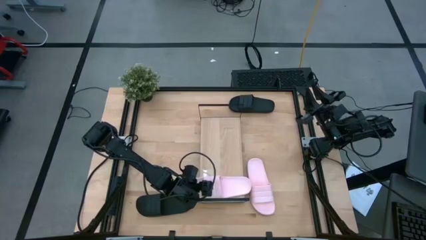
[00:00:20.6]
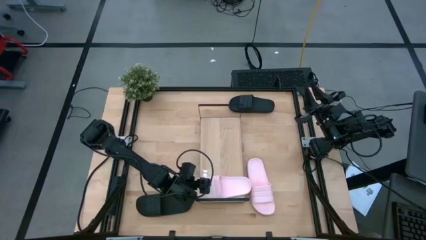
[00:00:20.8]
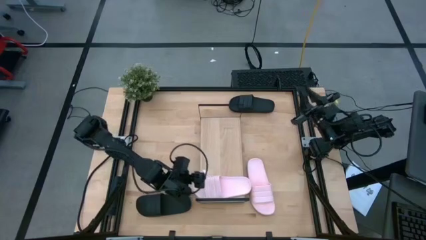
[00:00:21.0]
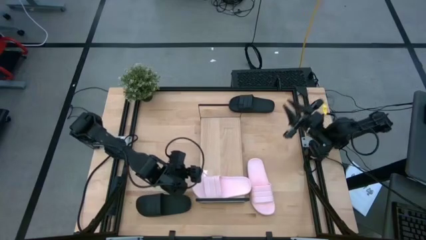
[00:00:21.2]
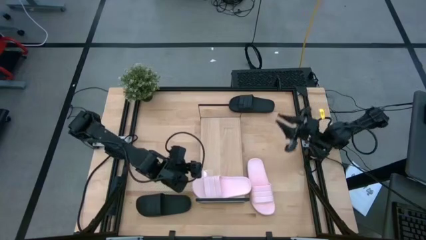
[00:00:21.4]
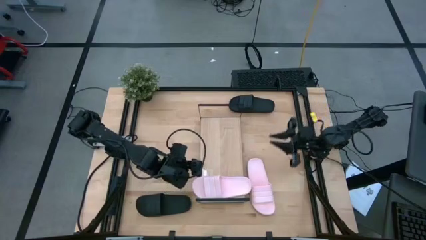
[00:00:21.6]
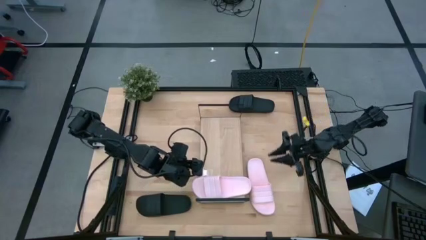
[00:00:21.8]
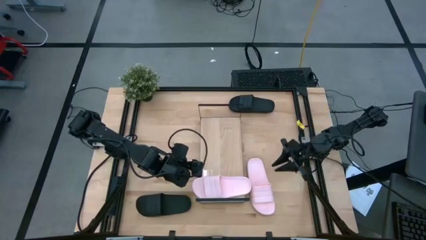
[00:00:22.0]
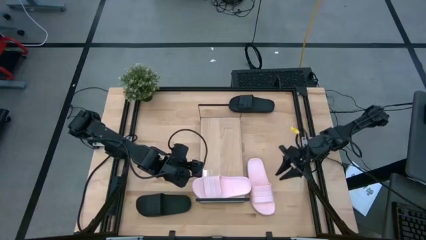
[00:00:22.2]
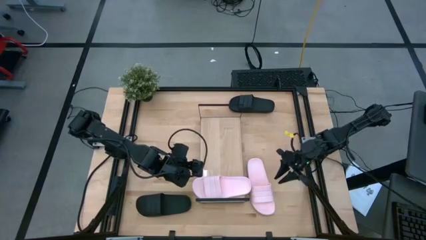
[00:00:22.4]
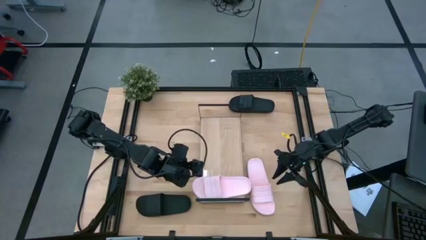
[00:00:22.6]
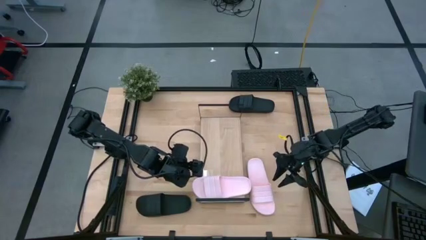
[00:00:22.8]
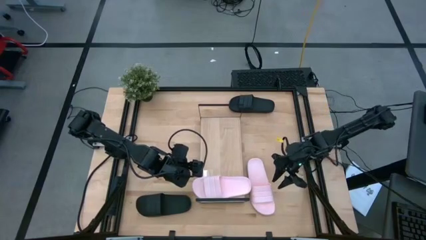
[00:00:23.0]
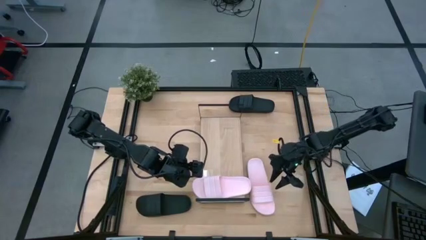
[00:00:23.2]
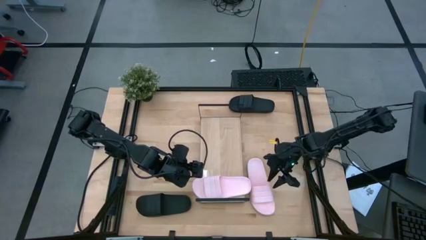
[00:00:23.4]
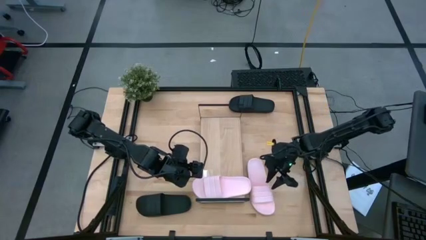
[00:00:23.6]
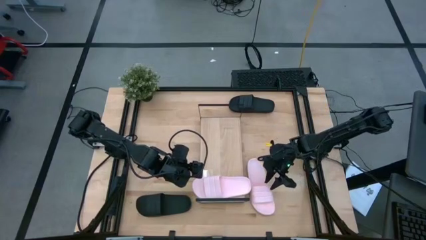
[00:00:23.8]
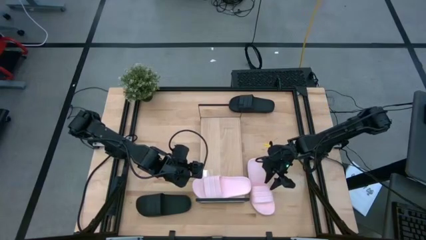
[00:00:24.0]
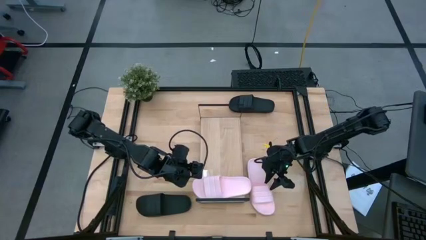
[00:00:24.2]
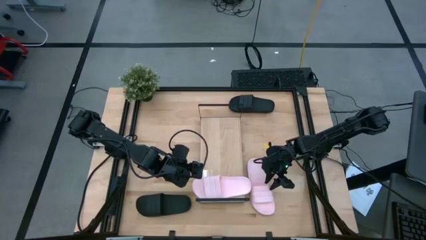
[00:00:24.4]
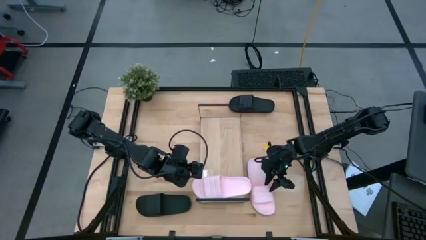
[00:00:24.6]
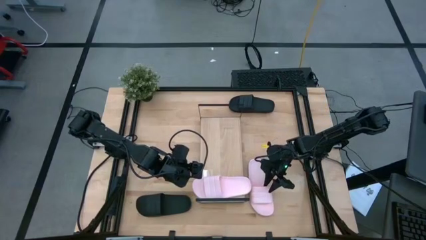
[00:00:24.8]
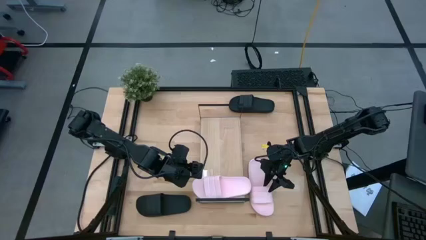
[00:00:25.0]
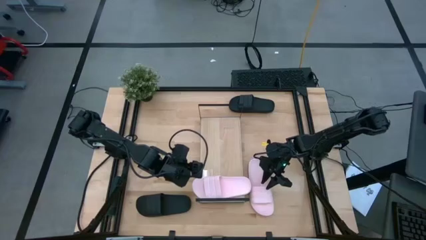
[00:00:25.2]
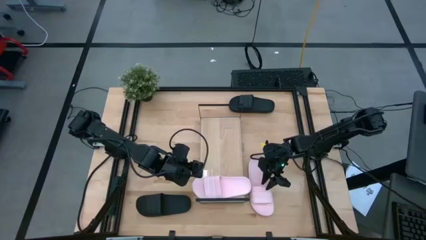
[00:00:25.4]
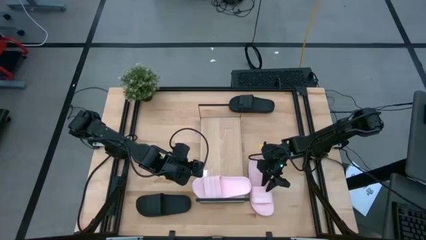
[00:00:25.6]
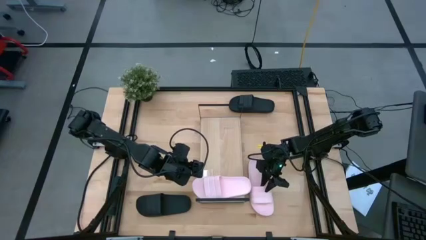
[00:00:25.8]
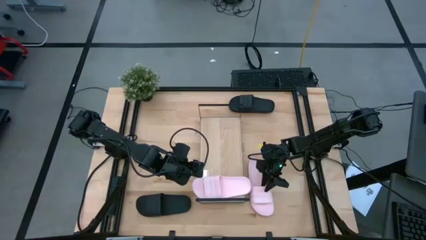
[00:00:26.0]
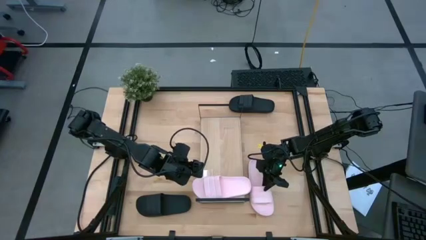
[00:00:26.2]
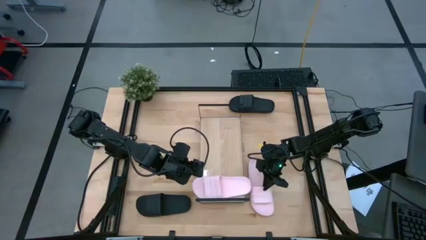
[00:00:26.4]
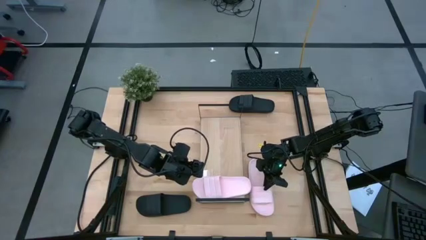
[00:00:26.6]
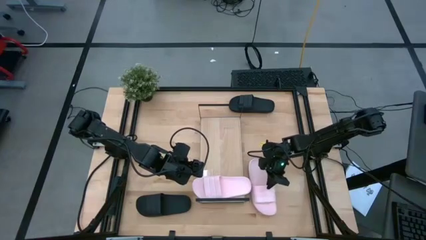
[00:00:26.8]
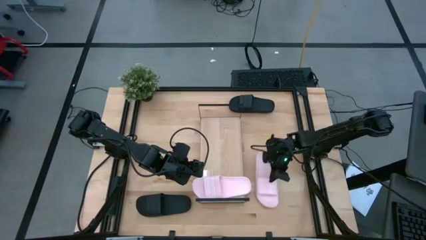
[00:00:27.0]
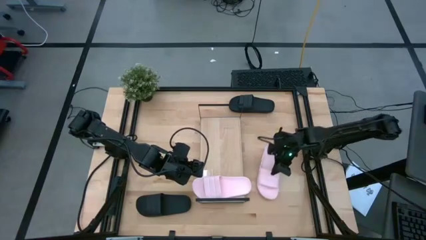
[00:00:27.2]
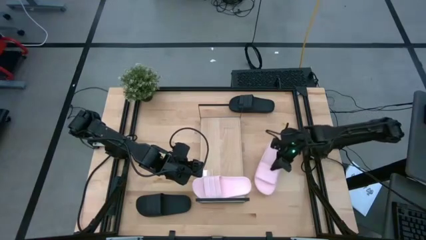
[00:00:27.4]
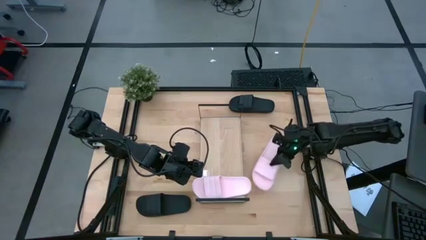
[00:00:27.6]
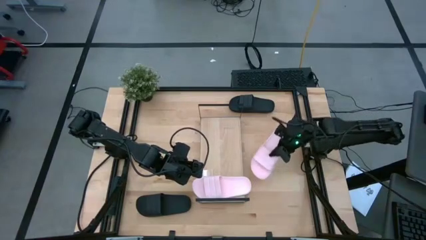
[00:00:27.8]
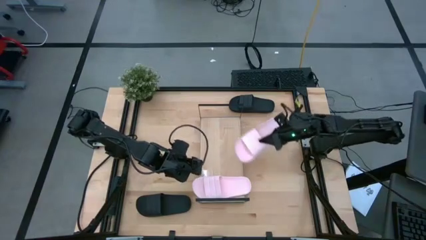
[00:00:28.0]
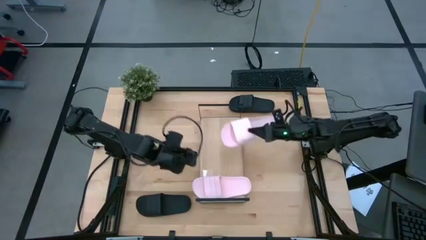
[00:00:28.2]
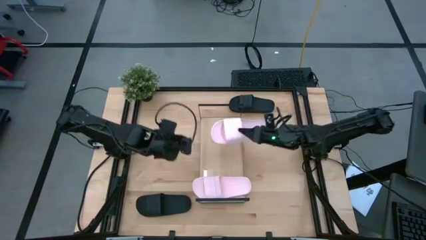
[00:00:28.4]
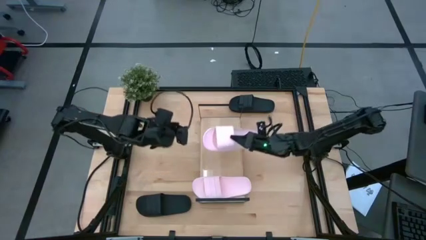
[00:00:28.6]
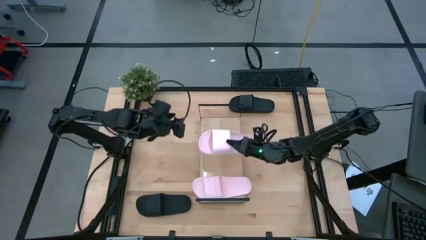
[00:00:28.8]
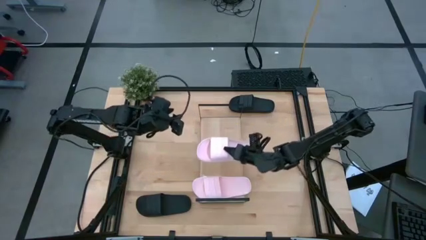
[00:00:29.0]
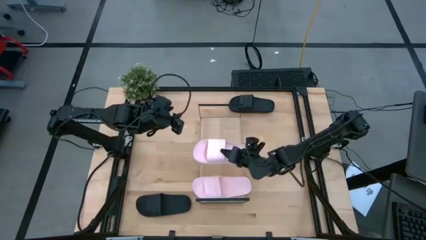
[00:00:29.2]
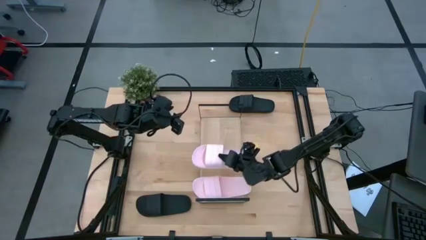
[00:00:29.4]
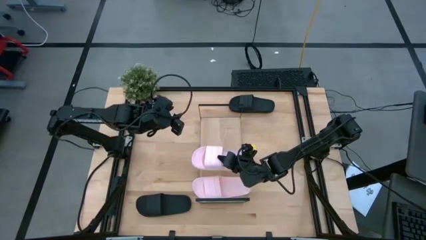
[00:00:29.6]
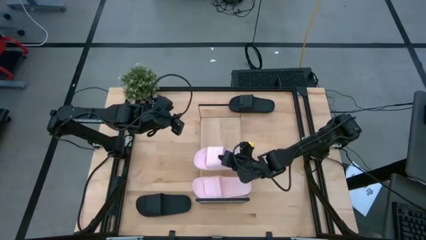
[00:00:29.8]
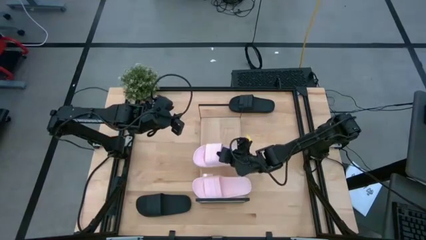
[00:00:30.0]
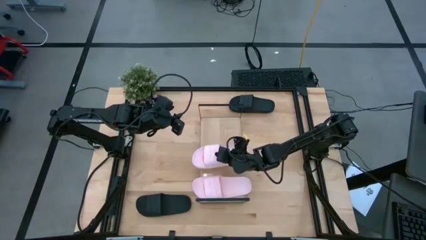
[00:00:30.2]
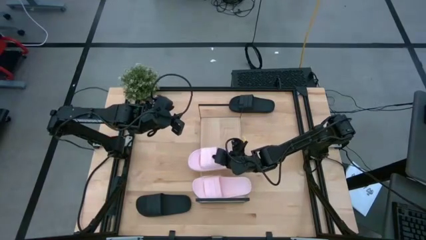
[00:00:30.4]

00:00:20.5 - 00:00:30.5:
Task: Pick and place slides into the shelf
Put the pink slipper on the shelf
